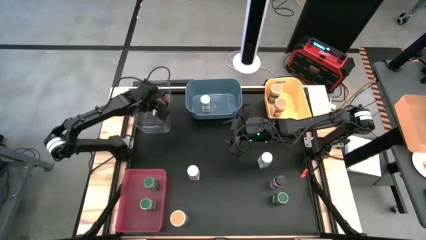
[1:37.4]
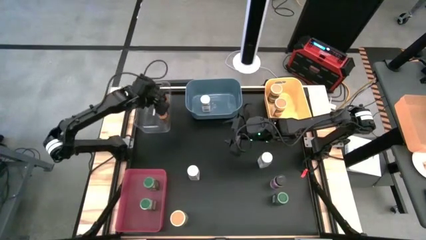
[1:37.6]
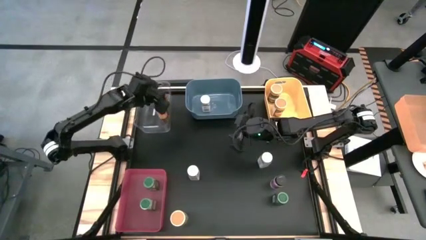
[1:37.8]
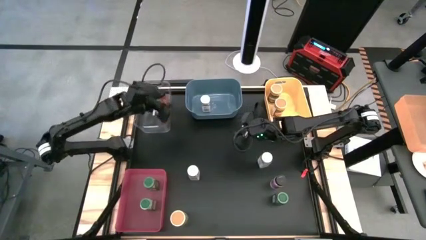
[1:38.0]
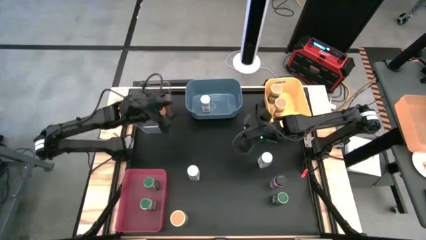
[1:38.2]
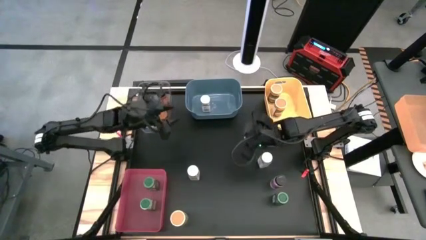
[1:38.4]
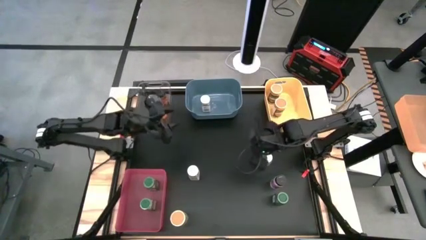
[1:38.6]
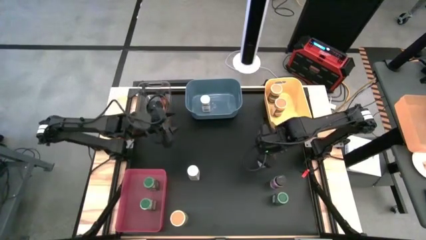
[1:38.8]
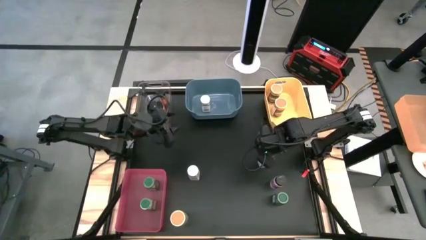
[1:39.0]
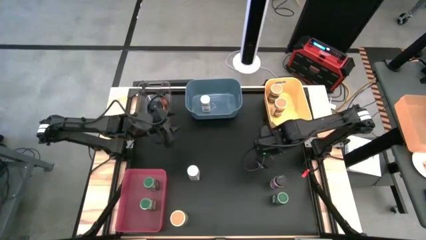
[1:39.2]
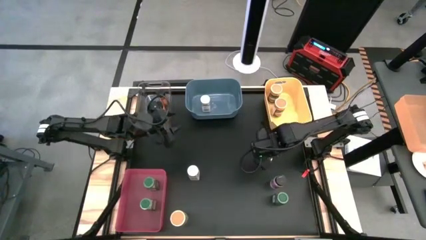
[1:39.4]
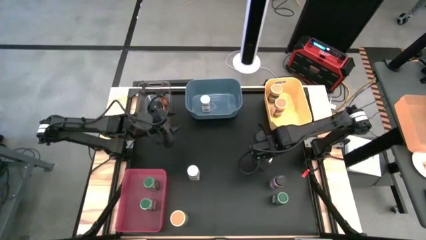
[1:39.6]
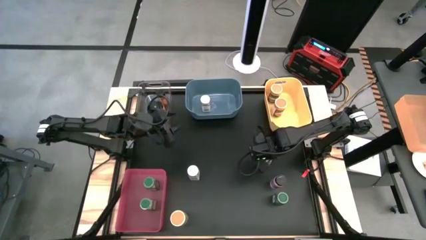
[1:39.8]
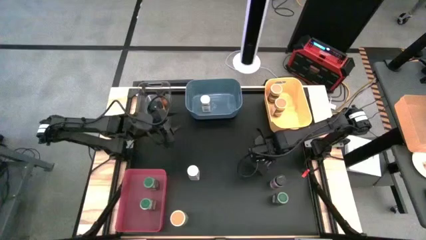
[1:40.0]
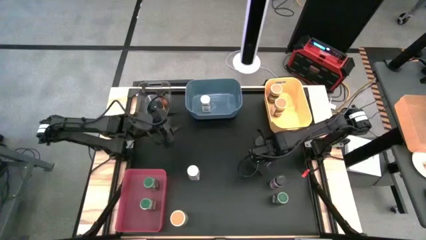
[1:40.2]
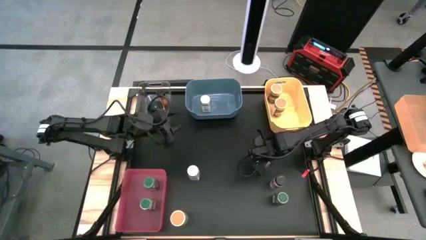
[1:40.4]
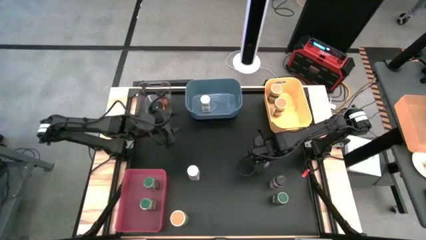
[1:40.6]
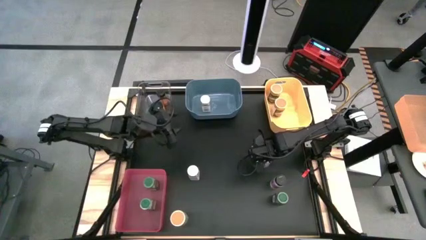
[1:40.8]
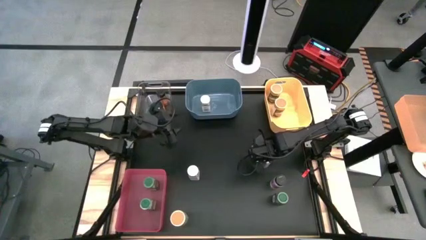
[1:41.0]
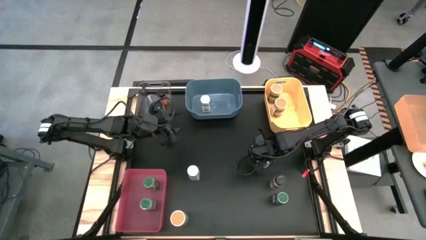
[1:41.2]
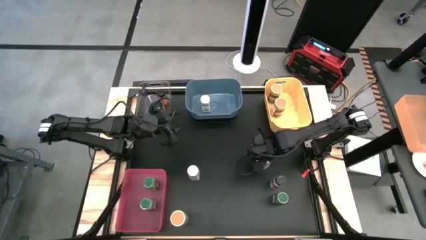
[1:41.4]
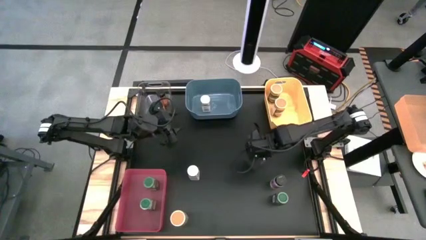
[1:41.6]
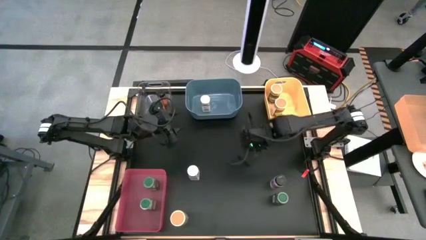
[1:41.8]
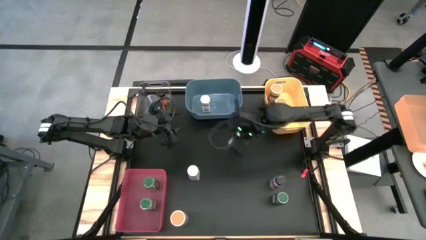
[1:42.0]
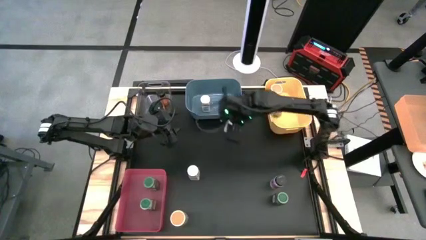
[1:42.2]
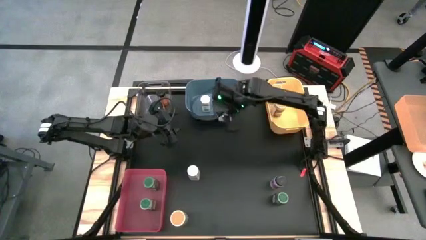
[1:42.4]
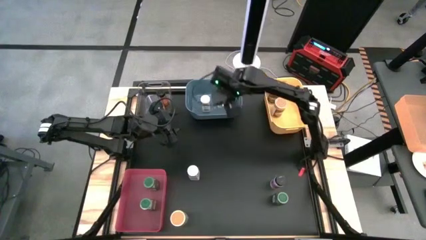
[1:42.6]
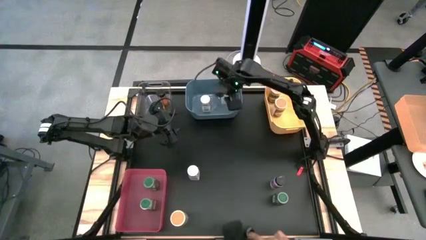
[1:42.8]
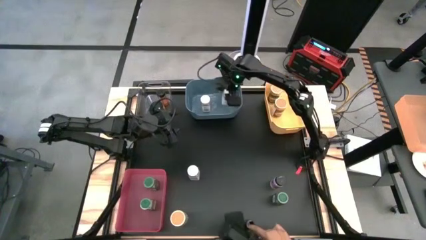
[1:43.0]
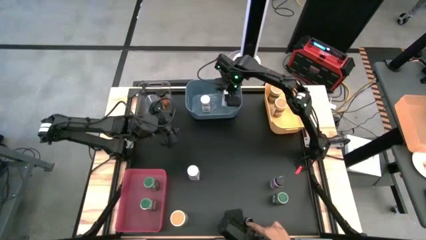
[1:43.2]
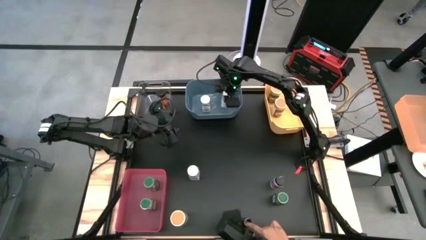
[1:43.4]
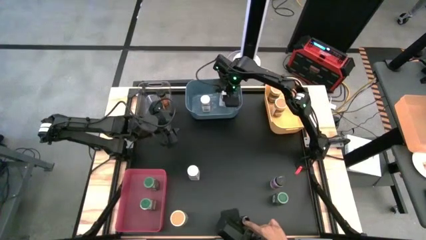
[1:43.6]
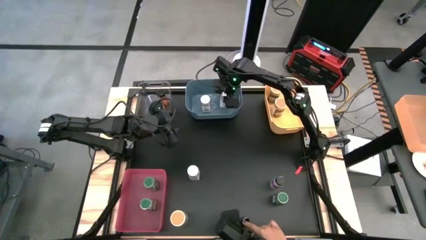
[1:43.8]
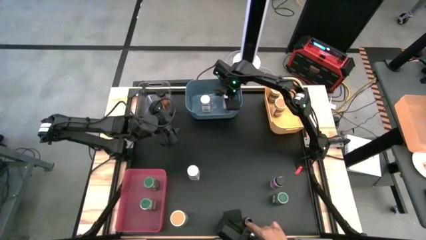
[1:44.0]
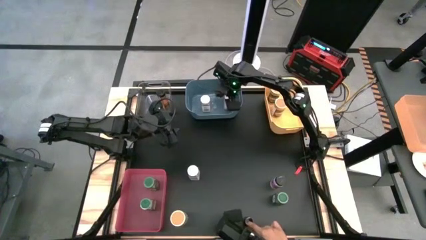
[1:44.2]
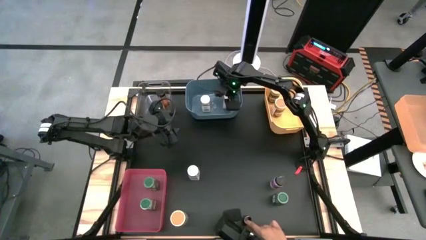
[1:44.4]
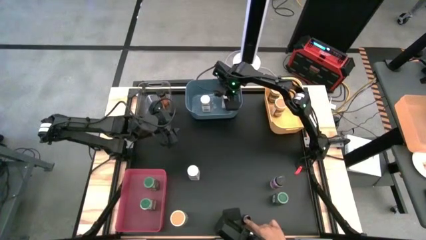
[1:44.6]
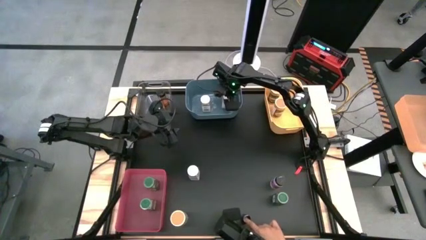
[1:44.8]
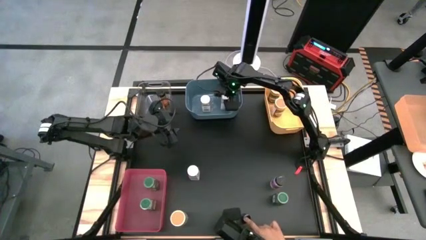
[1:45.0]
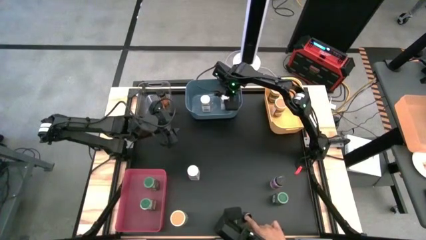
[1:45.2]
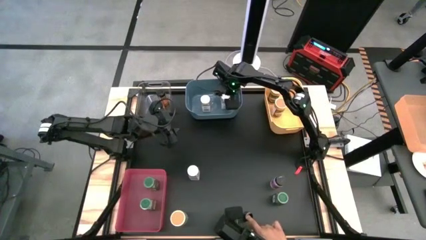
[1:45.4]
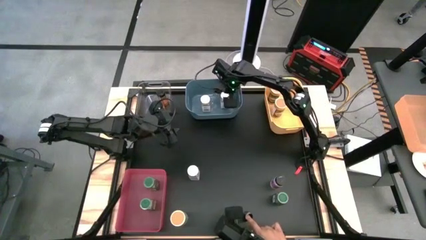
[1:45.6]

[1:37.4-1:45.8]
Task: Sort spices by type
Put the right white seasoning bottle into the blue bin

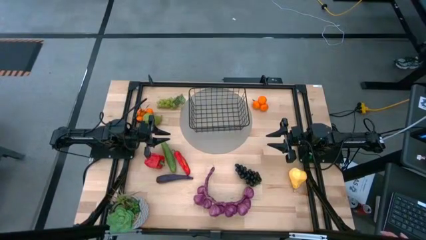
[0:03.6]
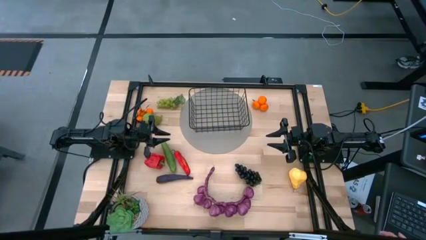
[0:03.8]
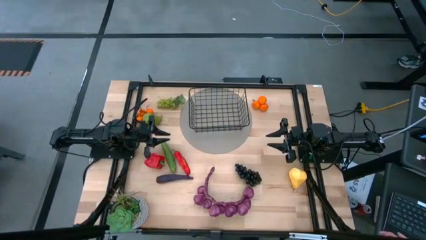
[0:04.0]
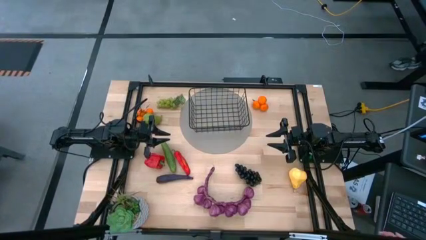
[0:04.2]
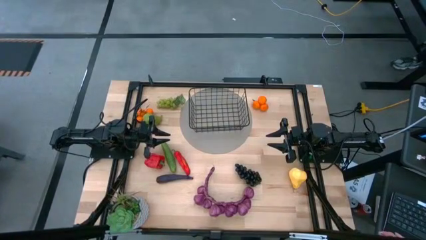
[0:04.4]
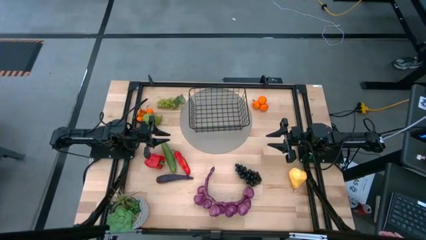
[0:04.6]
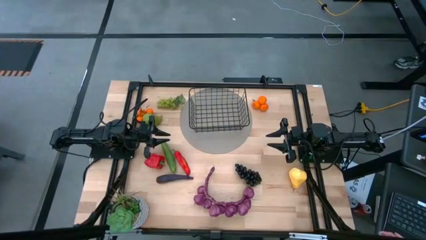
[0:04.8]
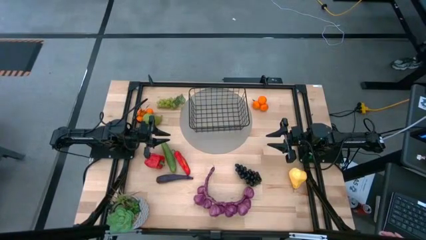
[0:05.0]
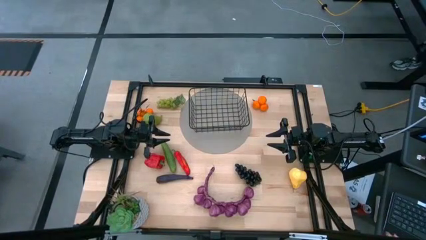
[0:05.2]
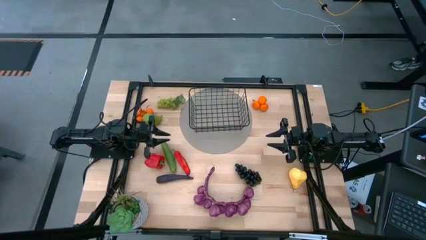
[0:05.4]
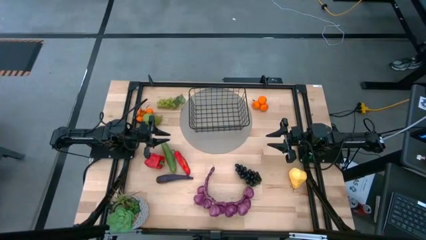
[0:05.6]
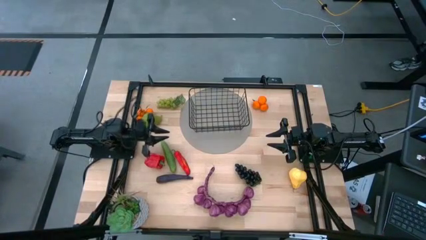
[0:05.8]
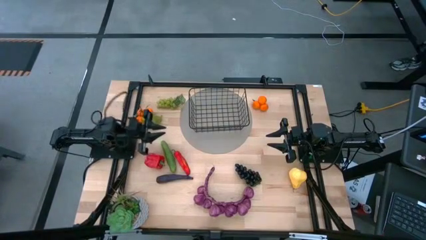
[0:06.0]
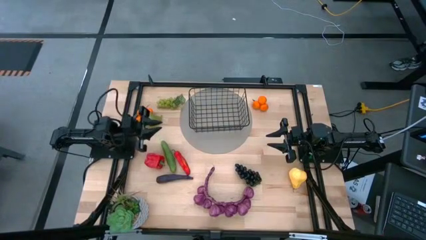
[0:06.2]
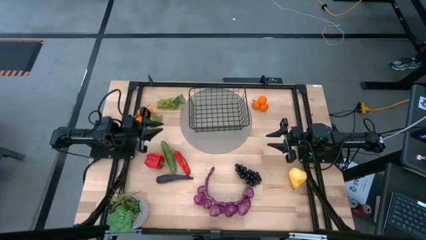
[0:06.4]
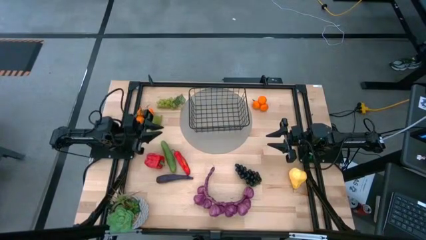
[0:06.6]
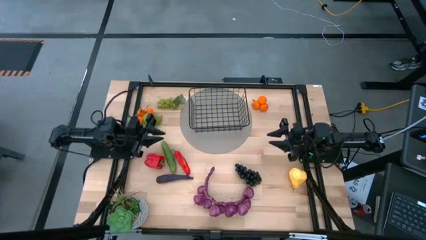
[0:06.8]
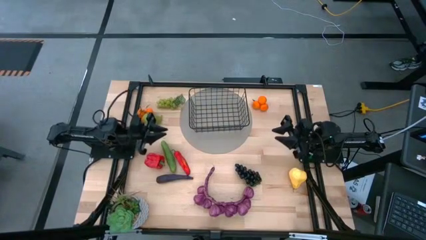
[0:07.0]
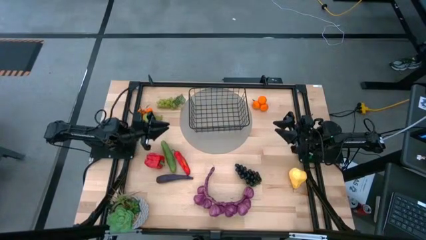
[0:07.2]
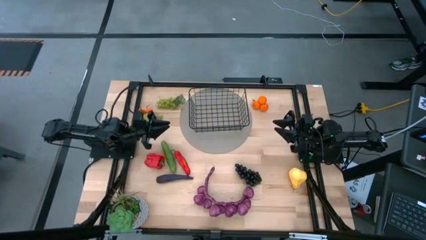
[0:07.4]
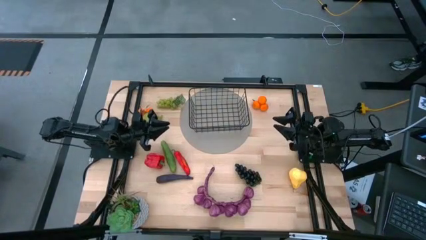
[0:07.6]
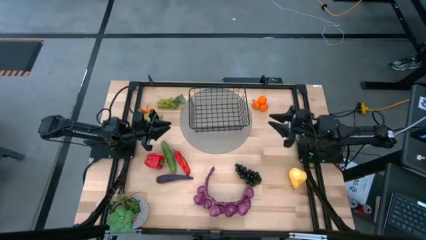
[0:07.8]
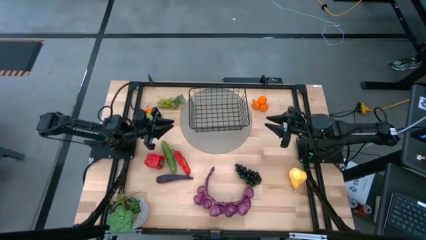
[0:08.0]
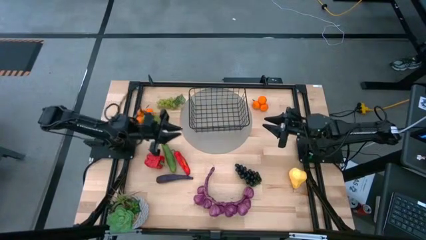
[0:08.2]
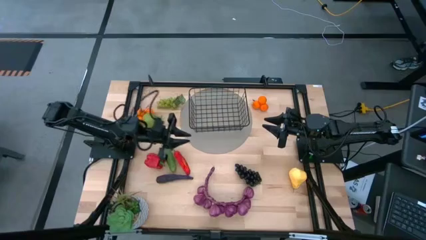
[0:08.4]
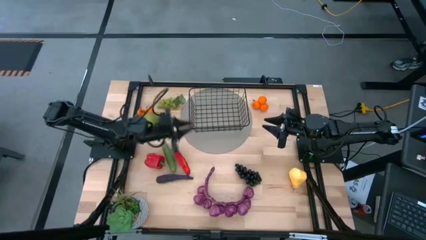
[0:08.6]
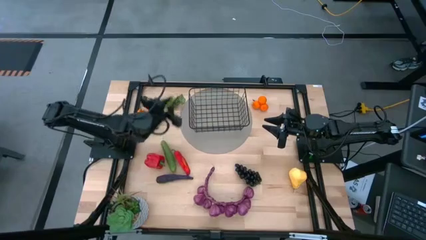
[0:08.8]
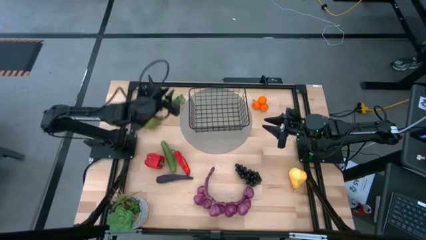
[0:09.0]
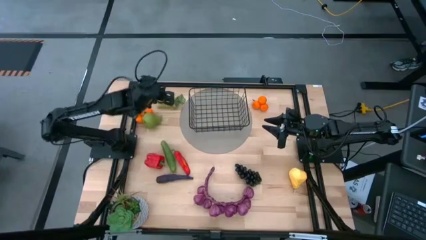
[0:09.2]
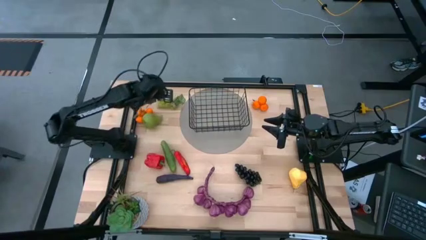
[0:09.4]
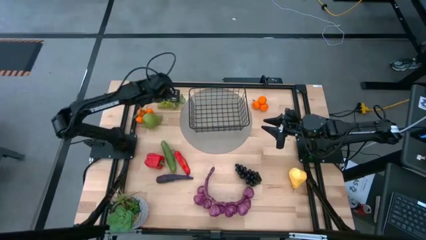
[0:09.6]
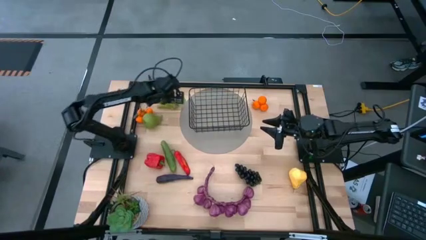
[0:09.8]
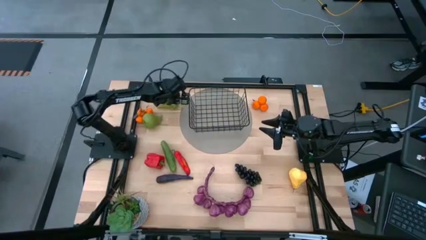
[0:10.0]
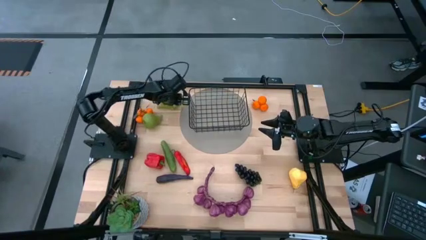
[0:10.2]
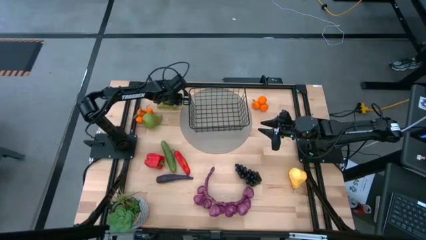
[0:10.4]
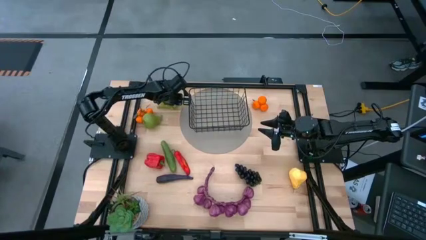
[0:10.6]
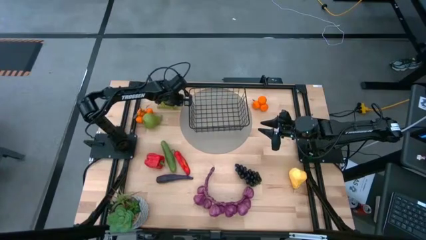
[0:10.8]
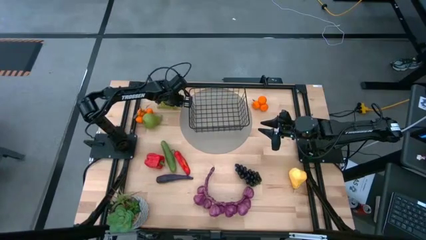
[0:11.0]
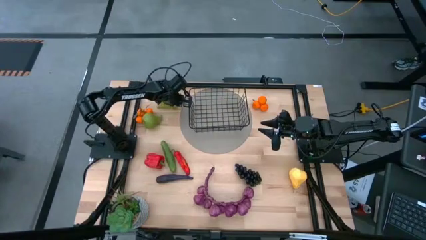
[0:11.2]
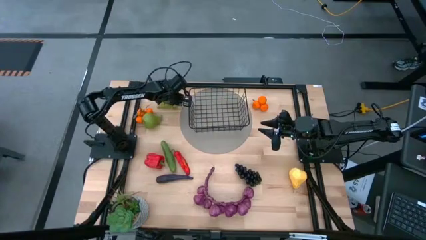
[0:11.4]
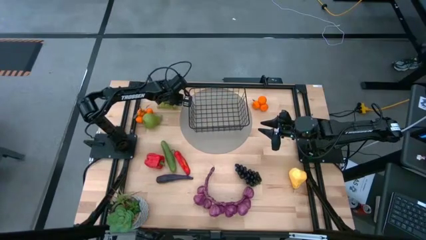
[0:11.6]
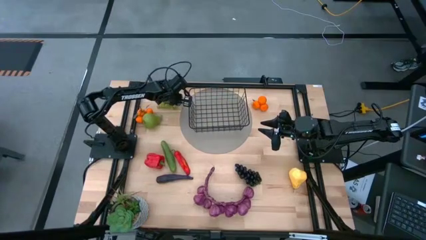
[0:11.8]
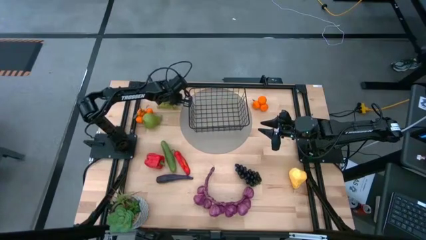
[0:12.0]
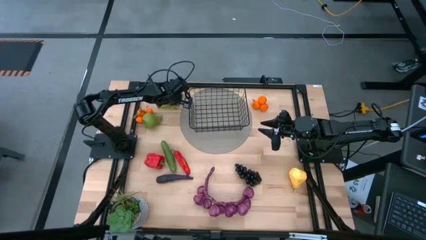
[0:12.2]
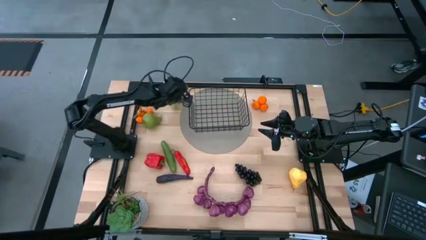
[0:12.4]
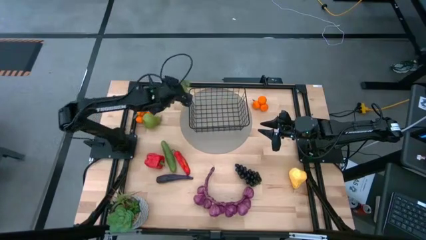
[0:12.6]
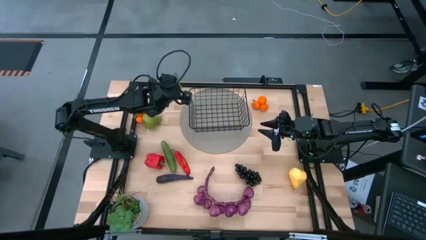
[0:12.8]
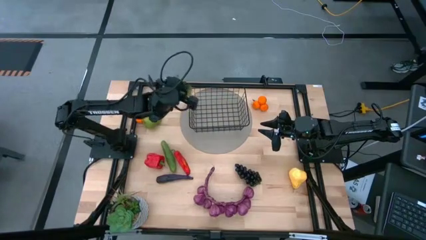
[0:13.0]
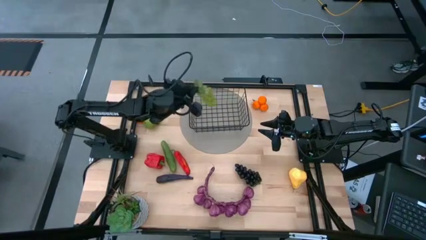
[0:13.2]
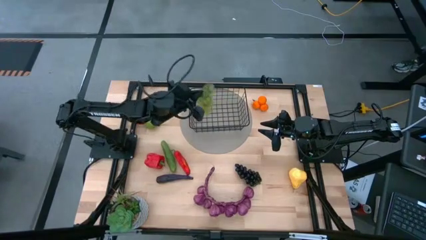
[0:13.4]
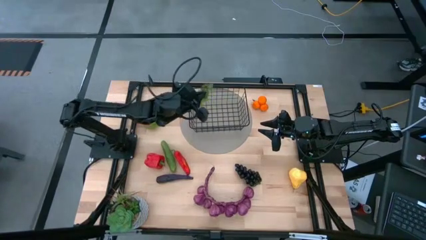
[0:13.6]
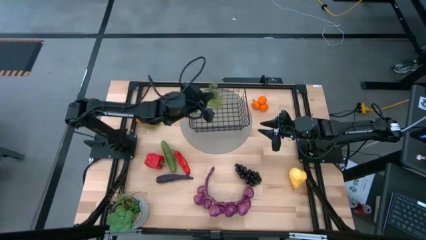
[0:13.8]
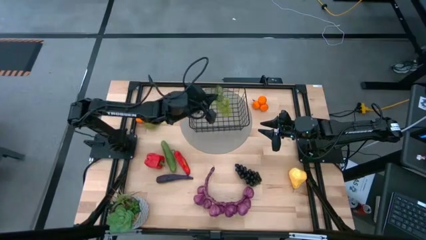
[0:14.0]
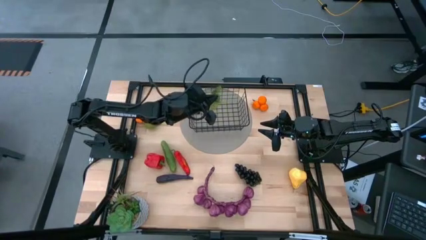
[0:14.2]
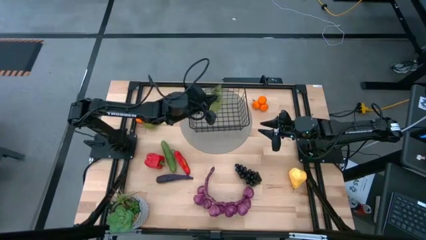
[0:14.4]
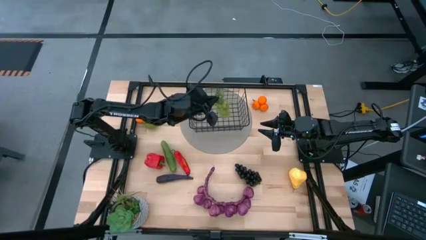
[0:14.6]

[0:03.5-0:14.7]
Task: Build produce basket
Put the green grapes into the black wire basket
